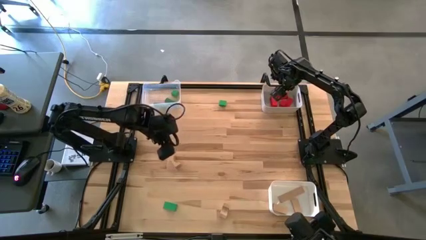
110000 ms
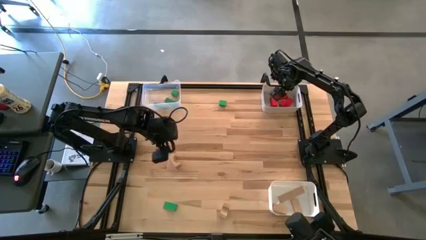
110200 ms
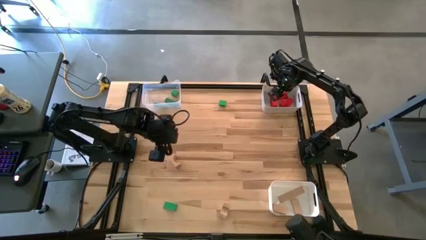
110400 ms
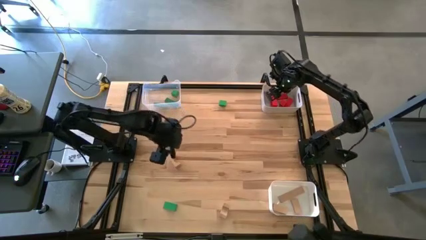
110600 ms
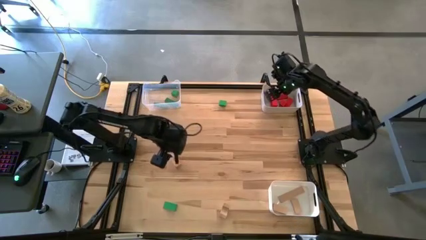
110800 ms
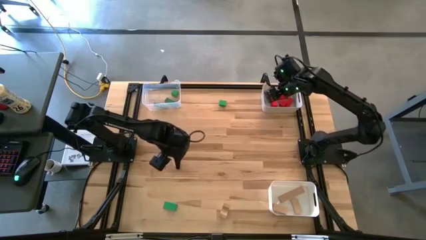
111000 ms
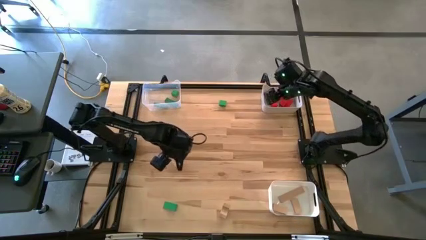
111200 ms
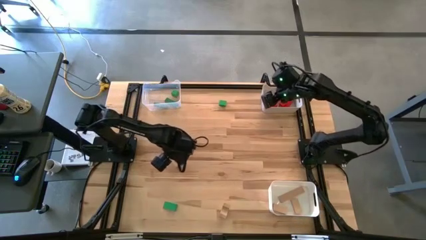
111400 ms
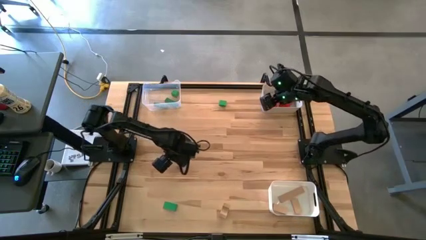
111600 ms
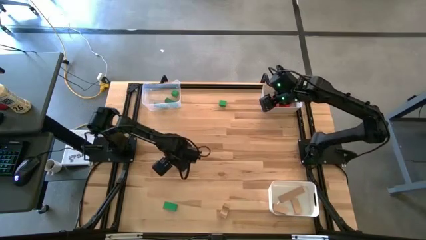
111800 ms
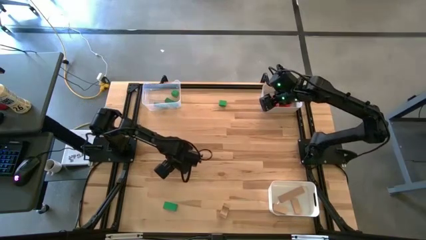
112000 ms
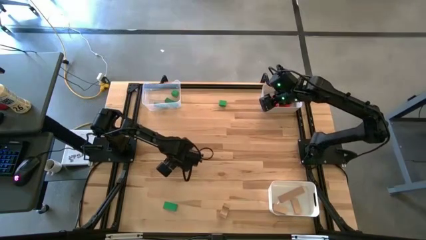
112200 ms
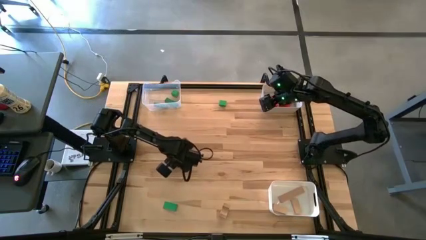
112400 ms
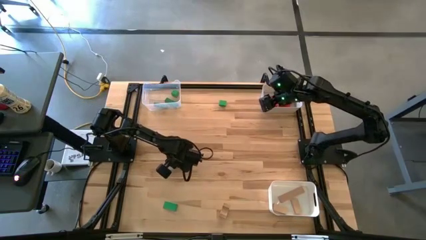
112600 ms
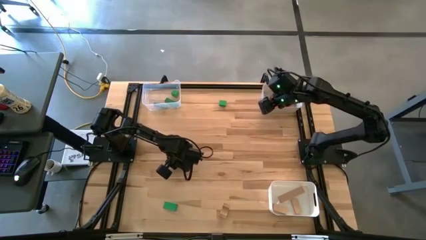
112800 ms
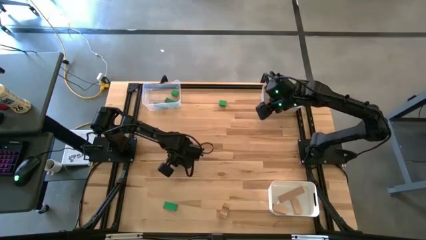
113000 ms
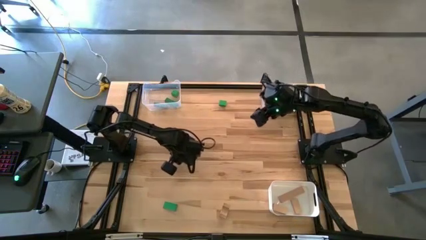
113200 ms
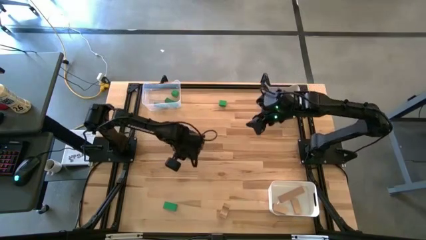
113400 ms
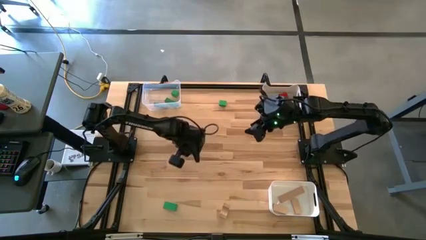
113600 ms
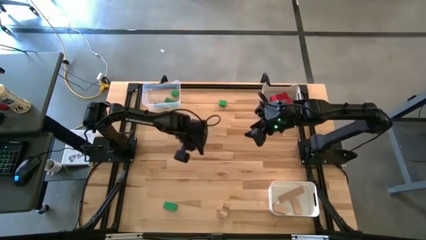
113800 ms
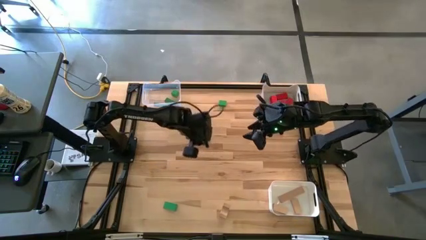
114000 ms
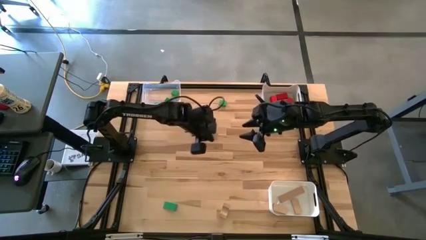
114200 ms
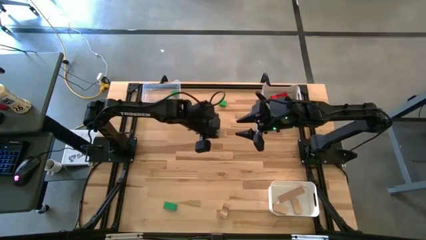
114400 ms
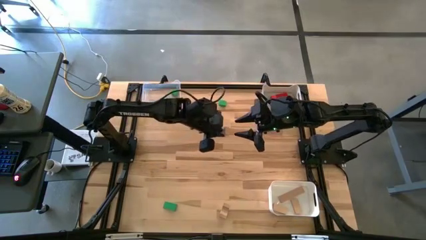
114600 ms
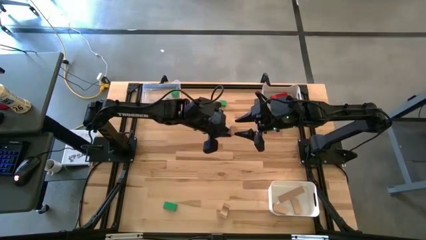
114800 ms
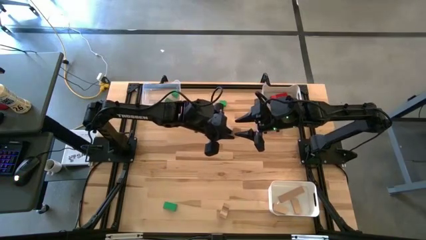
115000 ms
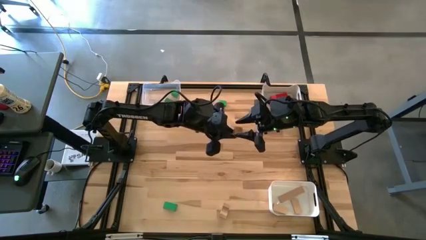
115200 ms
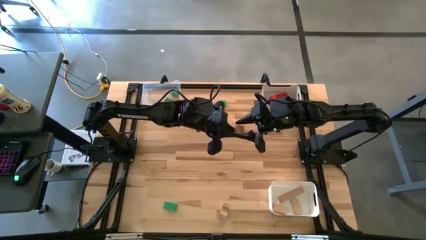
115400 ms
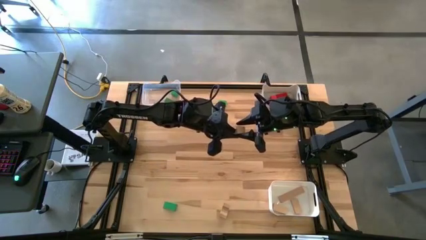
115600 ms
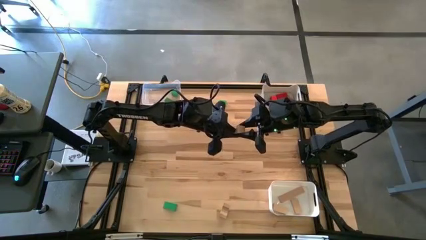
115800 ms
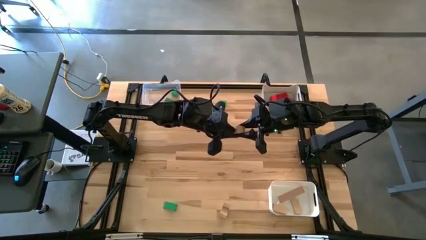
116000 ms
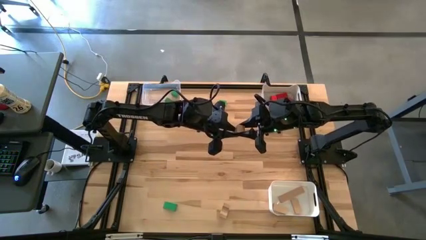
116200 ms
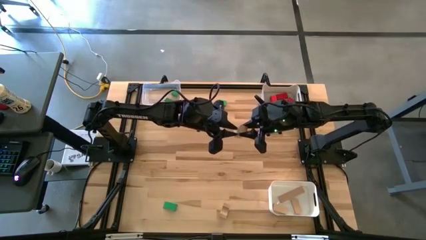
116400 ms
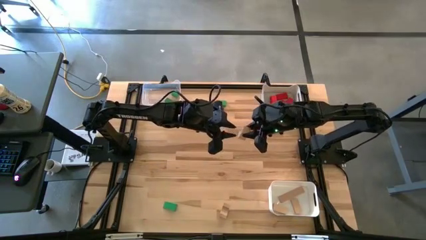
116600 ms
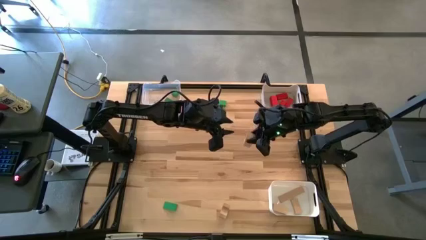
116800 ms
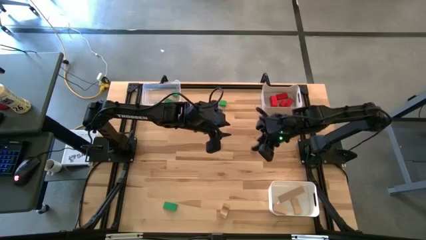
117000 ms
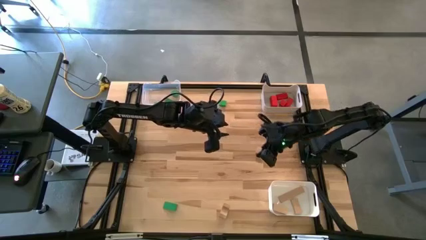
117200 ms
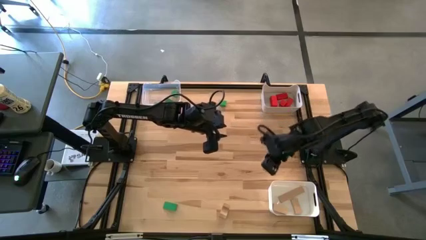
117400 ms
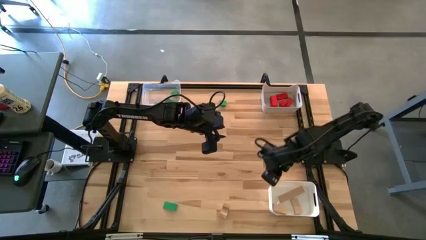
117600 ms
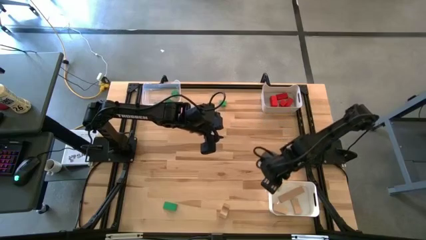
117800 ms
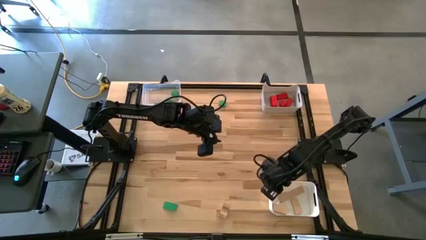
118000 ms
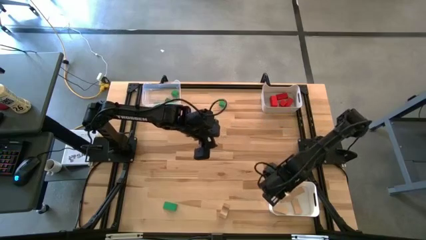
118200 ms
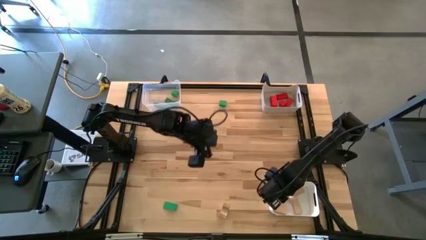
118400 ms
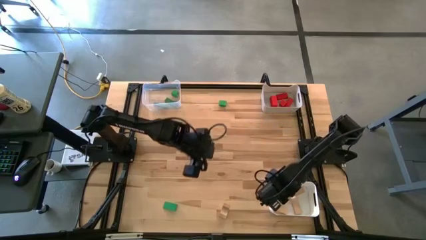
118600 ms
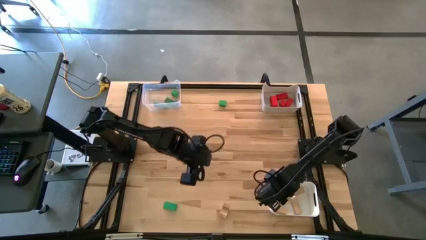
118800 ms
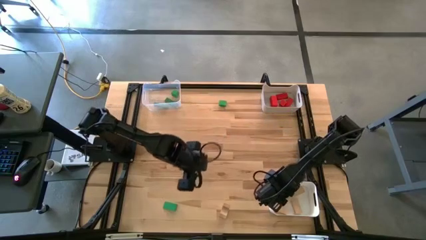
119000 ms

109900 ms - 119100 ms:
Task: Sort & place blocks by color
Put the brown block into the white bin

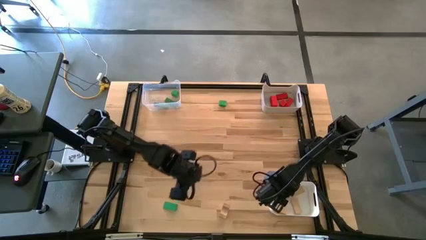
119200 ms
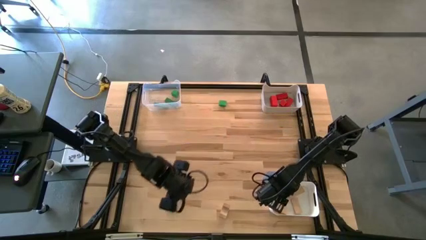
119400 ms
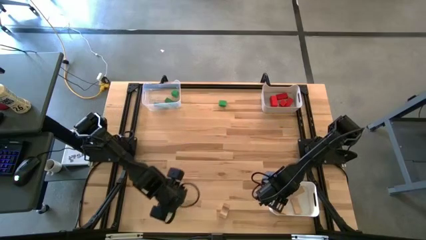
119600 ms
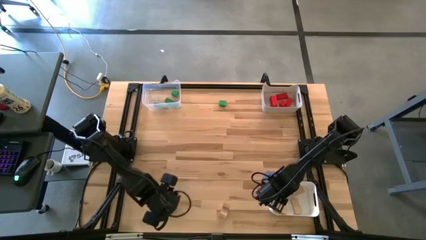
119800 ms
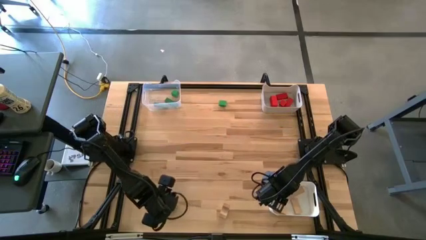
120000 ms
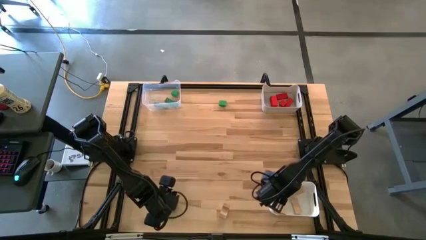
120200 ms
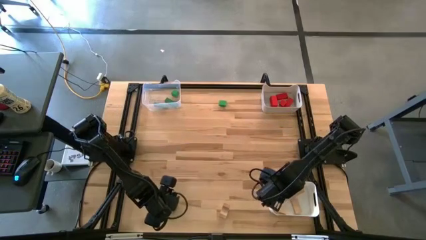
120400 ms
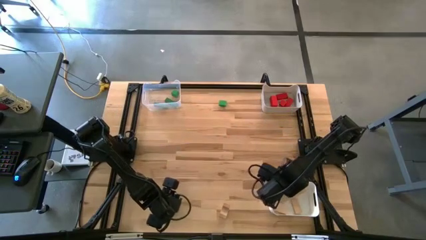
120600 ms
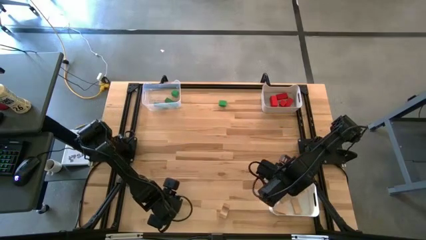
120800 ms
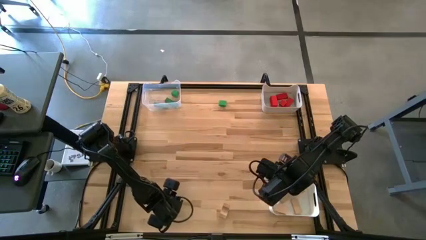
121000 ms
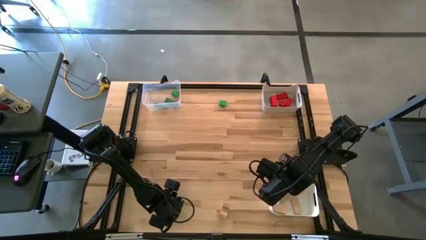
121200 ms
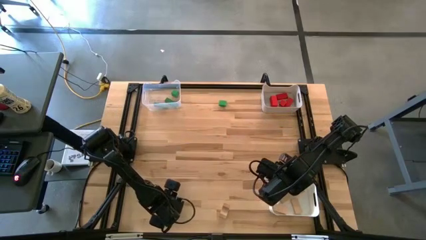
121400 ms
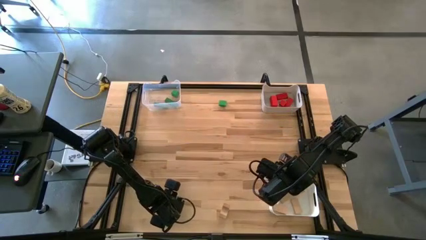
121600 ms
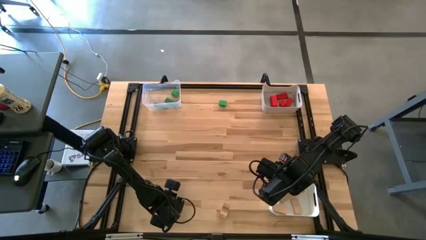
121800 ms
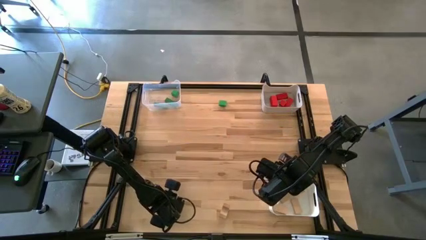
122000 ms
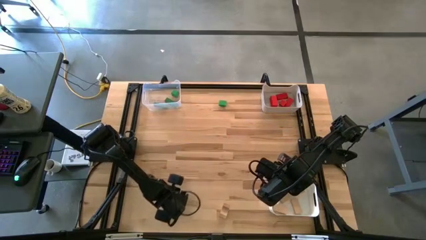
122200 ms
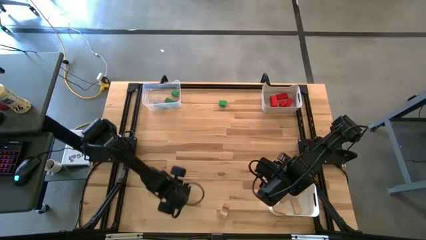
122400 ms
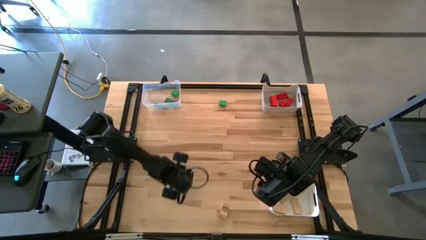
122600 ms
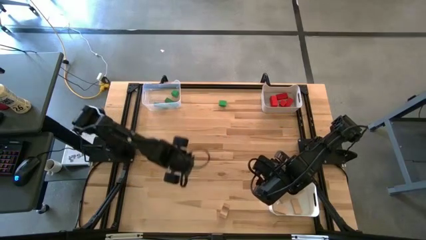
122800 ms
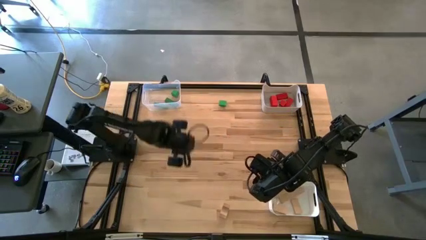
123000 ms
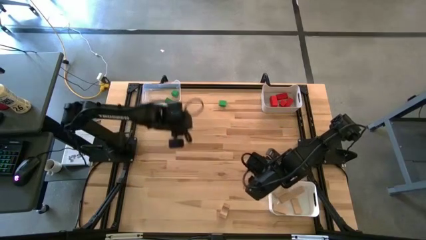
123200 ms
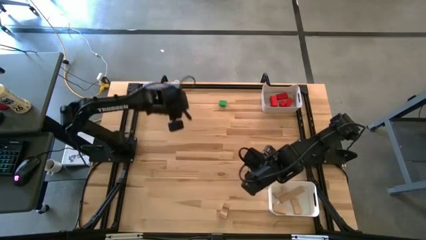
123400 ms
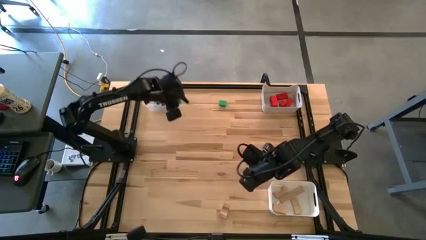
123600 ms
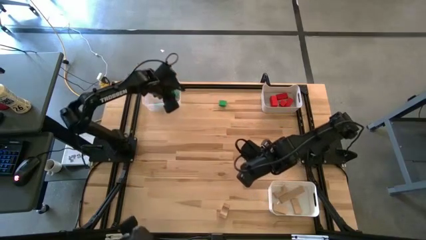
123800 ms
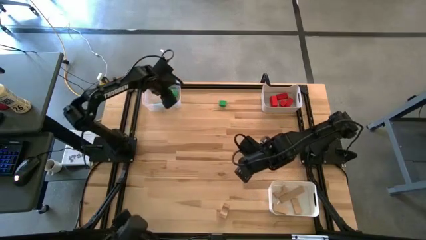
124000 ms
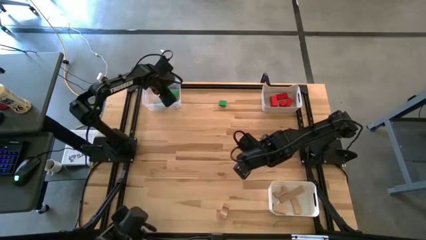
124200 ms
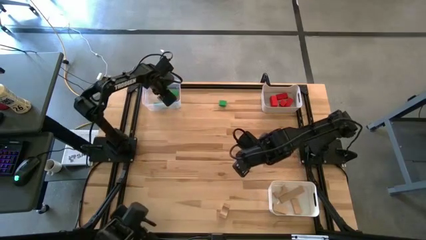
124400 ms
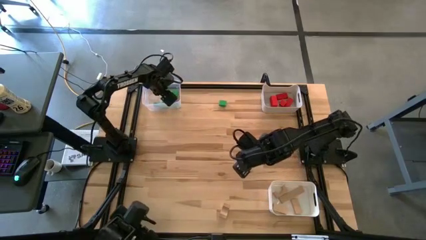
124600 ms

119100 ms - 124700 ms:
Put the green block into the transparent bin
